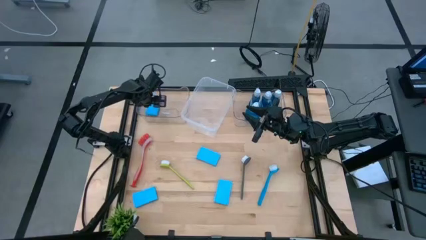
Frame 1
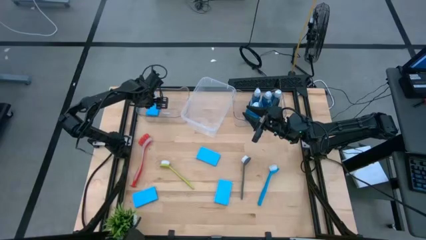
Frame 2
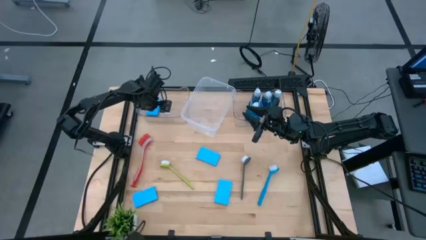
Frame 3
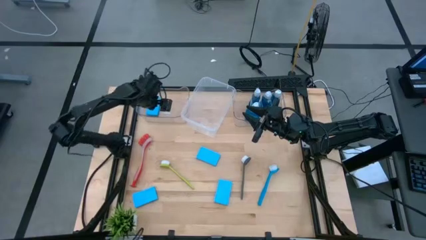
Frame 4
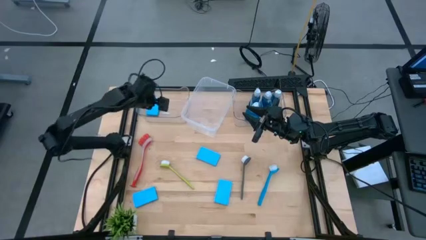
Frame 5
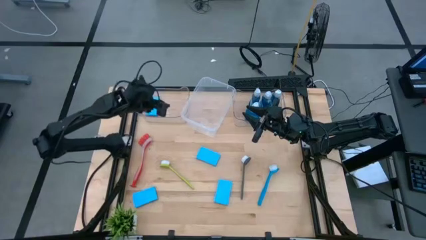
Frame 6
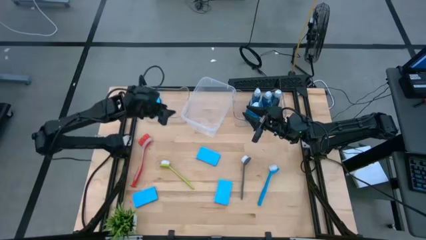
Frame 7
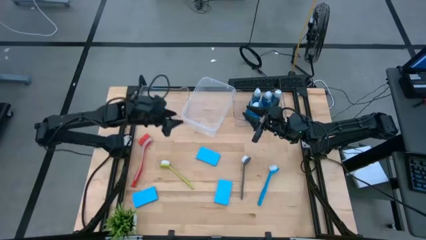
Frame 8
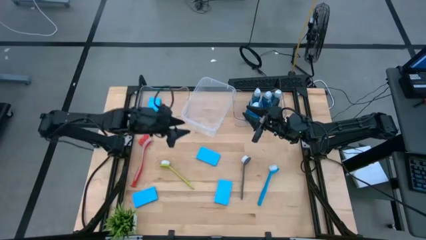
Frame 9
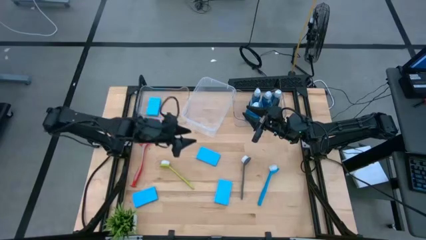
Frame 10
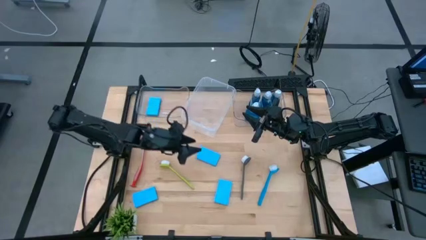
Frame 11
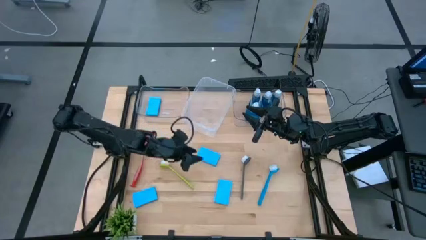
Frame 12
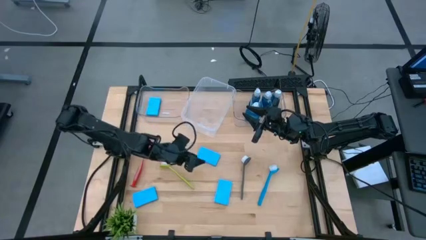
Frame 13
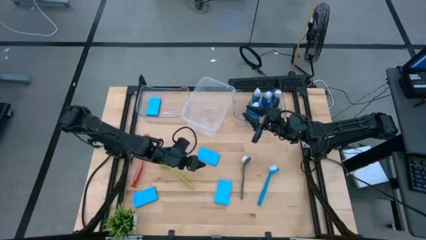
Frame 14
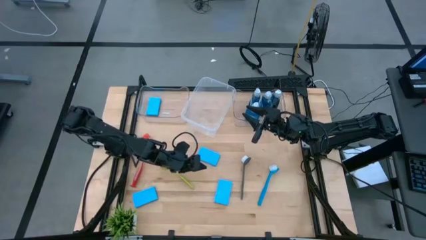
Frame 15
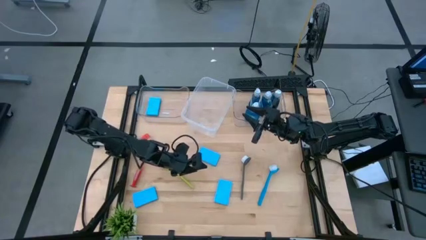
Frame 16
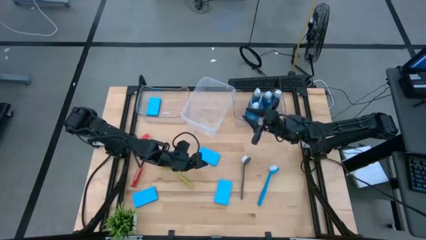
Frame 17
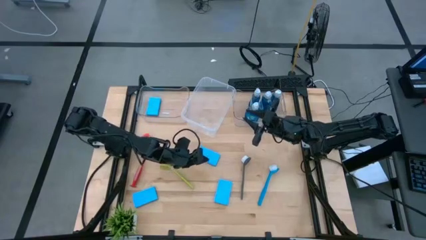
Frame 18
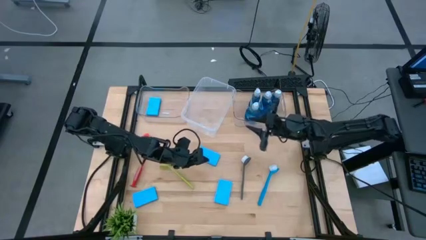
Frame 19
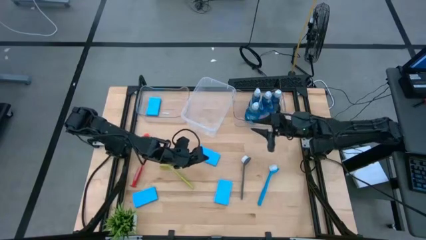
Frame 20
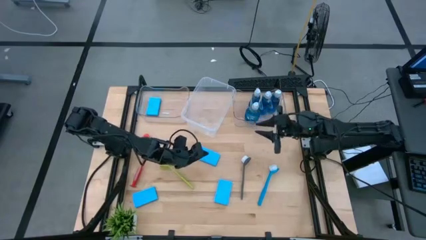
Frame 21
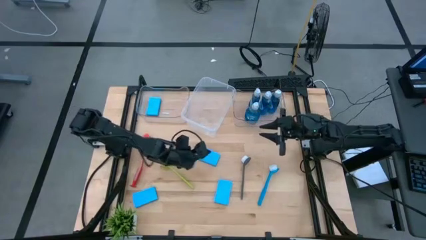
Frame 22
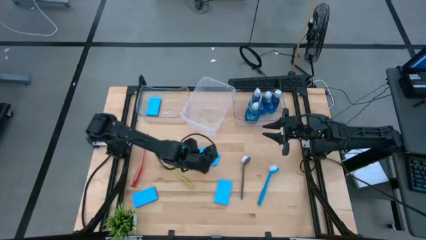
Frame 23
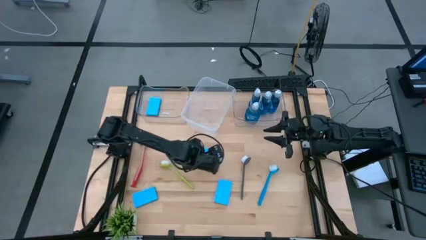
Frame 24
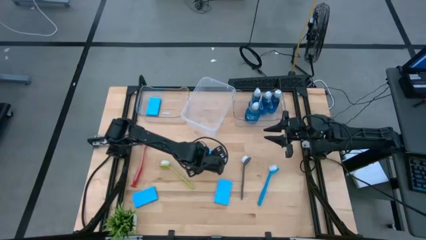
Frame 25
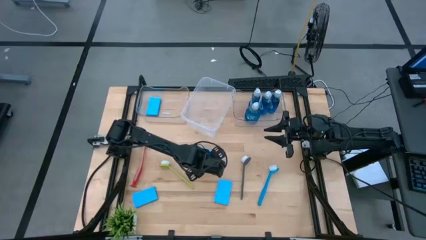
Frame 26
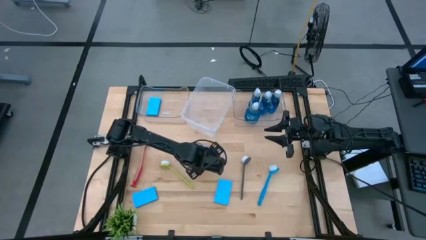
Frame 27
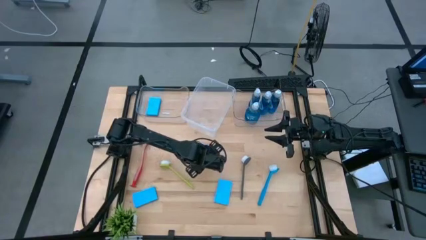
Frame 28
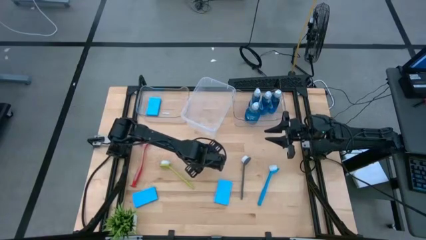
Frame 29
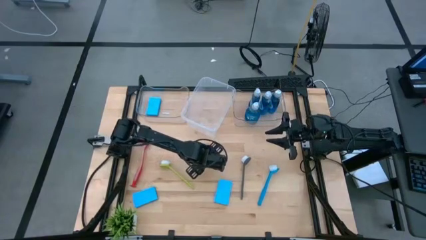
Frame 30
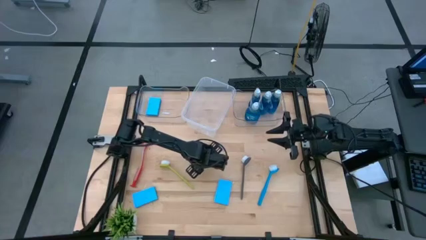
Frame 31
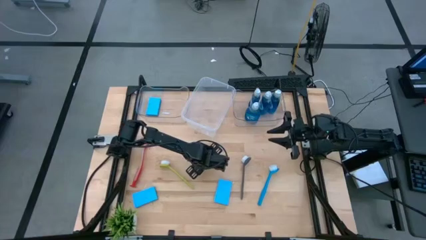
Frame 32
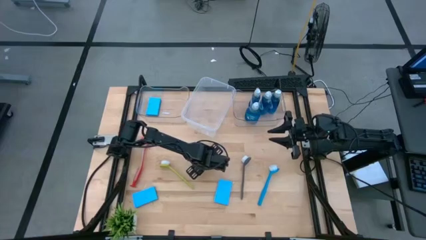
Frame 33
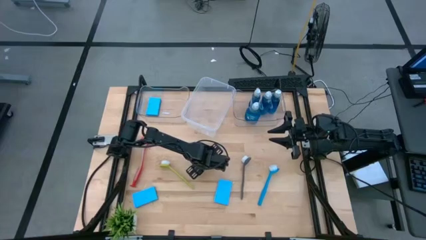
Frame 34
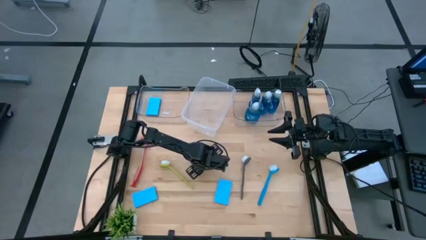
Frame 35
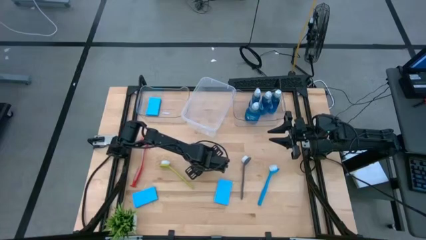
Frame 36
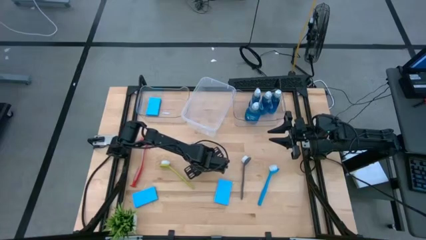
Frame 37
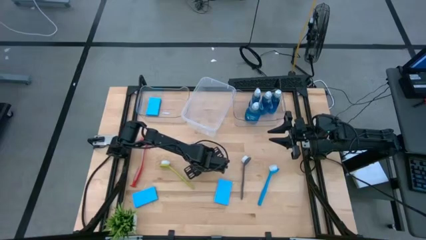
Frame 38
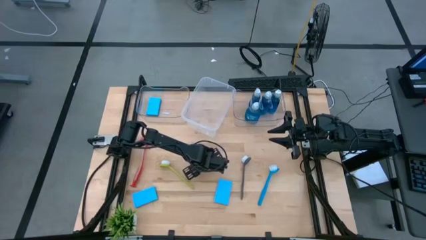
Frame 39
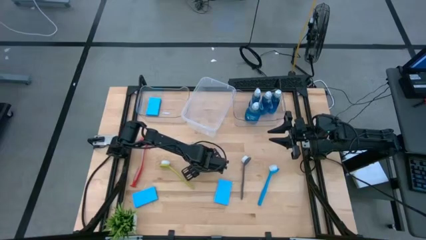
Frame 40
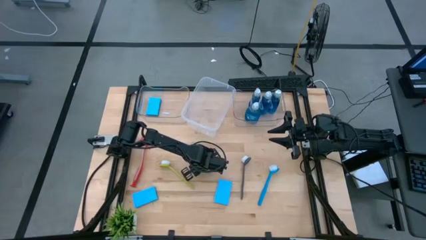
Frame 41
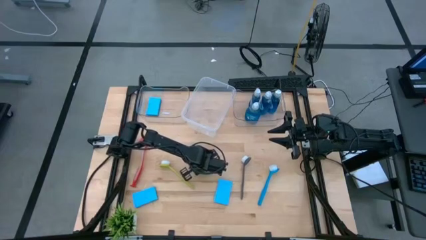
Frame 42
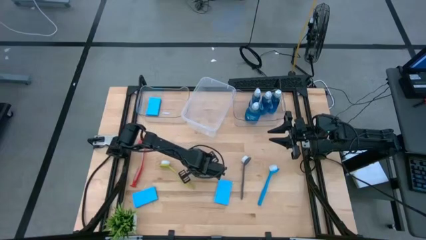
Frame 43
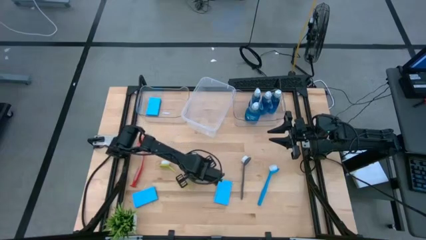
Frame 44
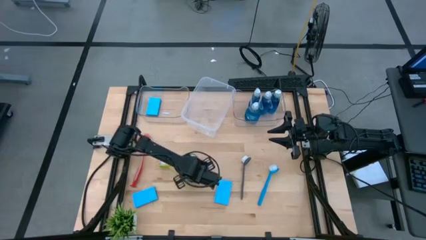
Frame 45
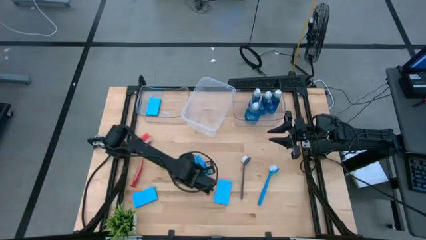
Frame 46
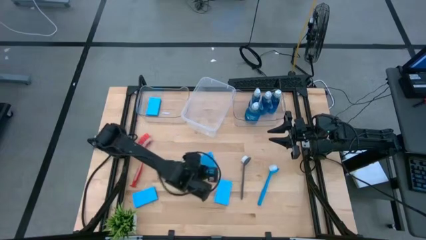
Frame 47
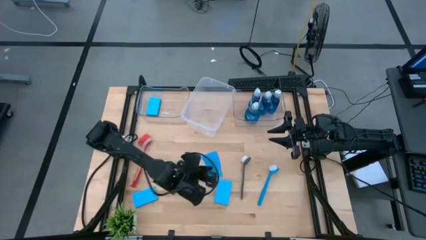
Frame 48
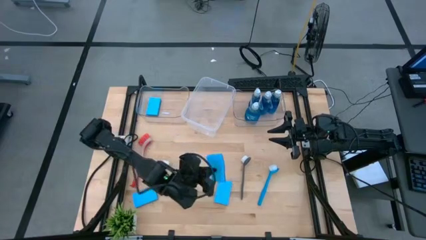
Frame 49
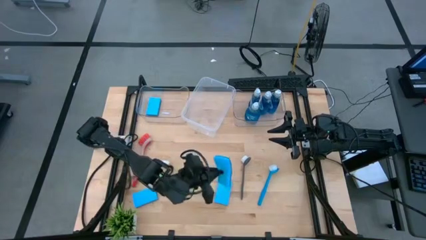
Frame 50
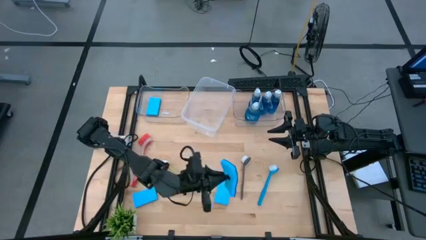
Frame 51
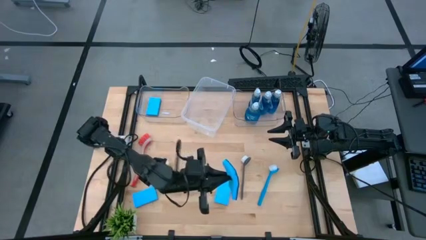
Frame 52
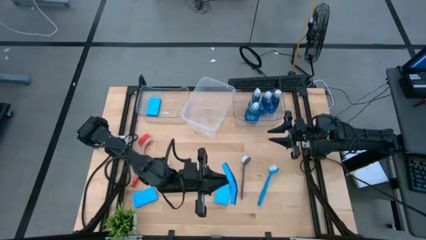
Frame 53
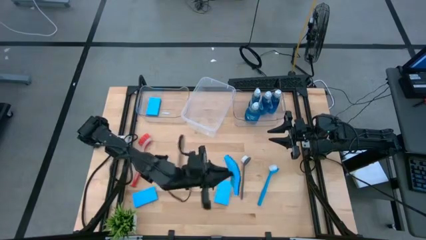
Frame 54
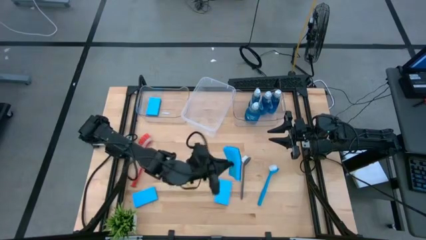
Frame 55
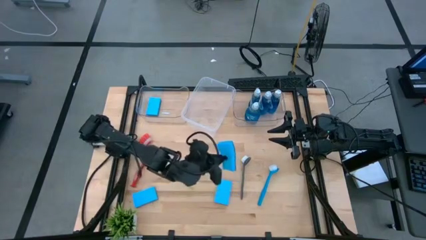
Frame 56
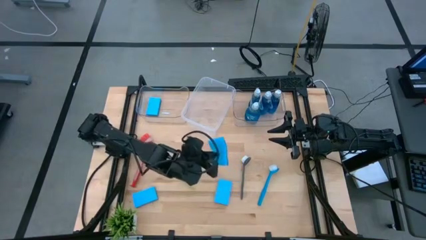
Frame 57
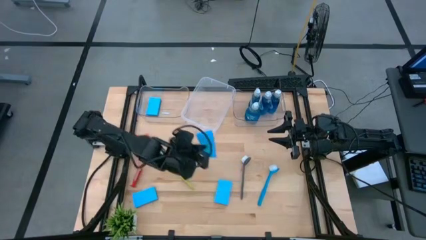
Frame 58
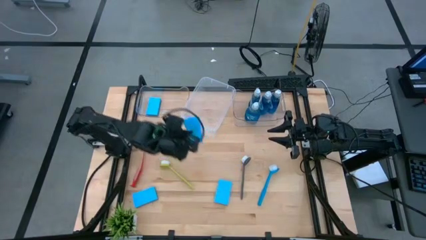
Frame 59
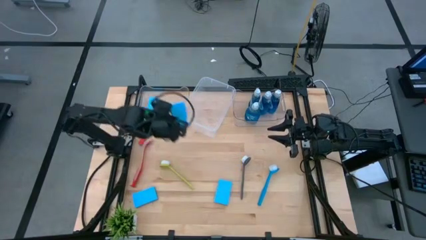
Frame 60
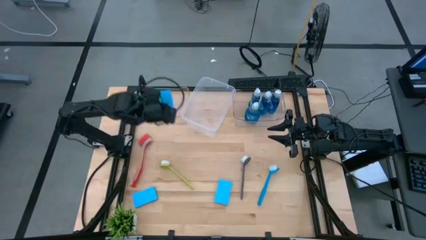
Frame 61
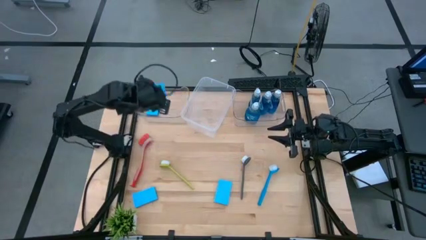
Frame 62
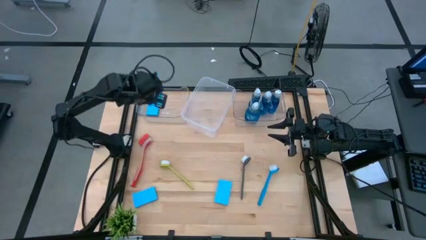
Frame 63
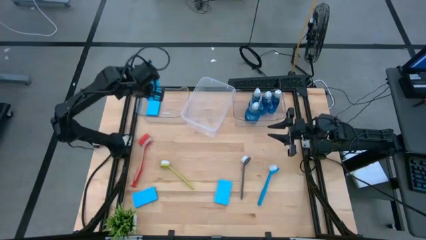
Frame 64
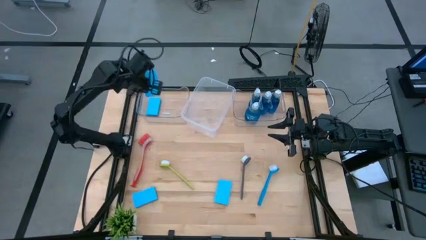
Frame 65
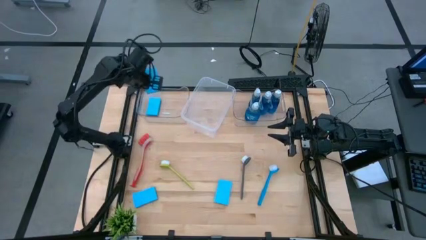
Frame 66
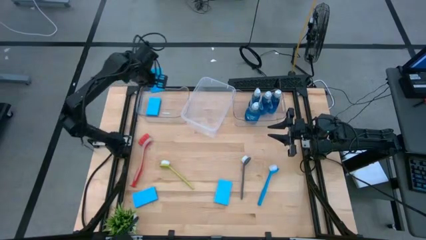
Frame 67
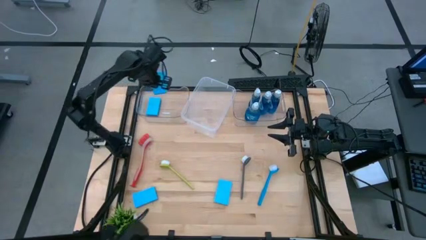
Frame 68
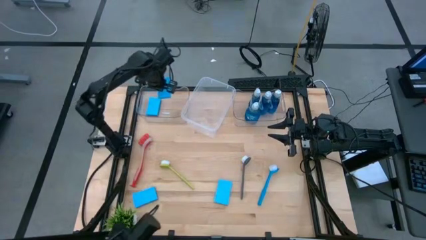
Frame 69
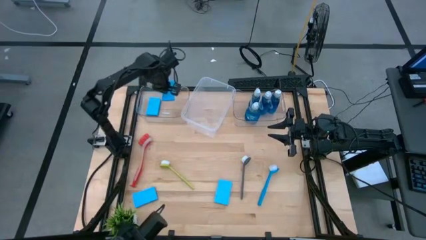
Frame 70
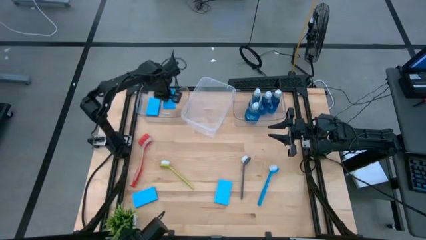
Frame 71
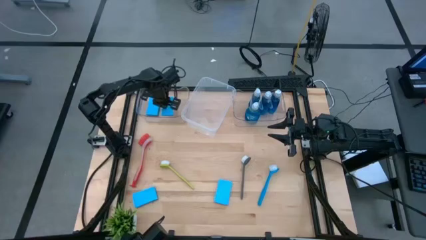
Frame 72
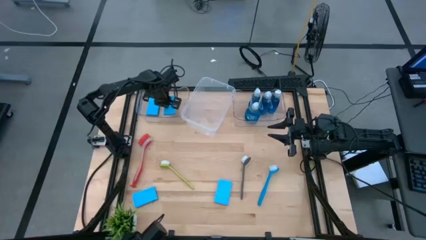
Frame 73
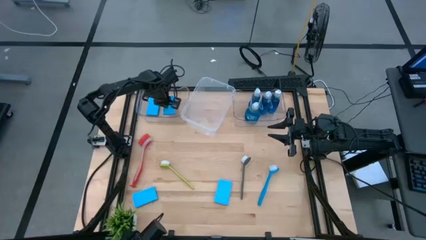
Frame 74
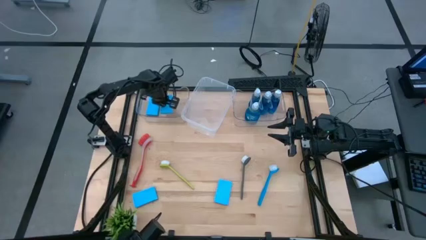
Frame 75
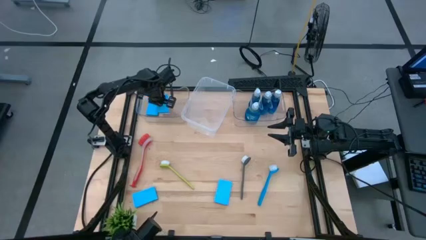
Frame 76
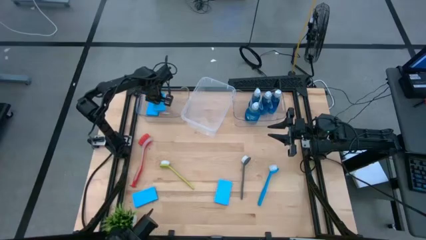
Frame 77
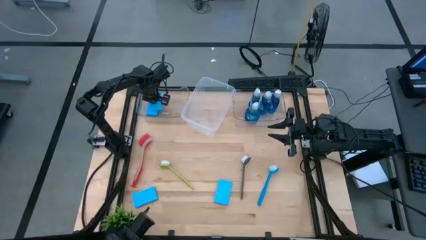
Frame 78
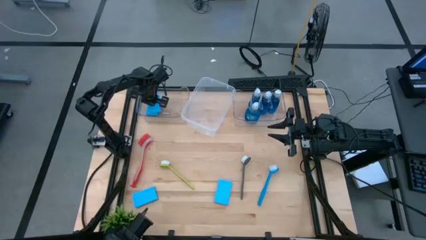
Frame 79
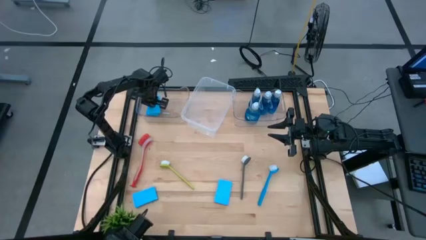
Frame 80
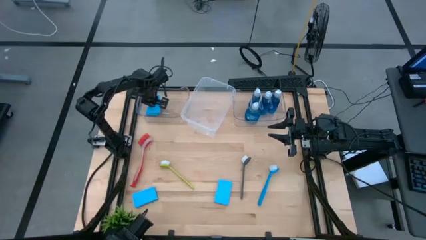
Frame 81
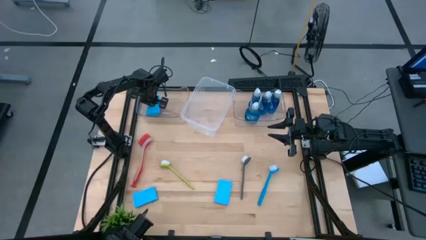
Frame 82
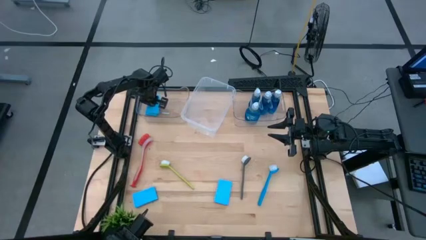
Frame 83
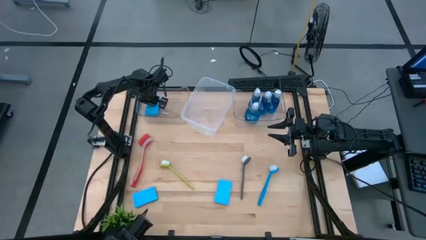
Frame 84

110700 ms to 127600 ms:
Task: Pick & Place Kitchen Sink Supplies
Put the blue sponge into the left transparent bin
